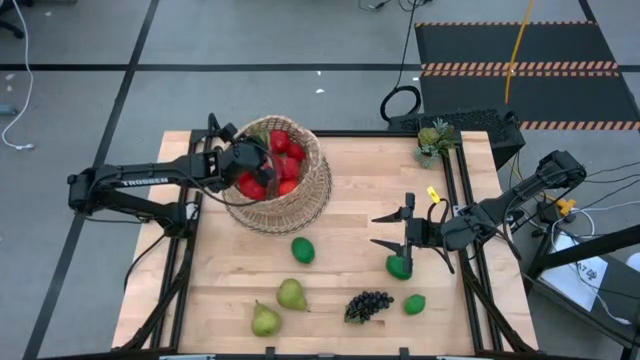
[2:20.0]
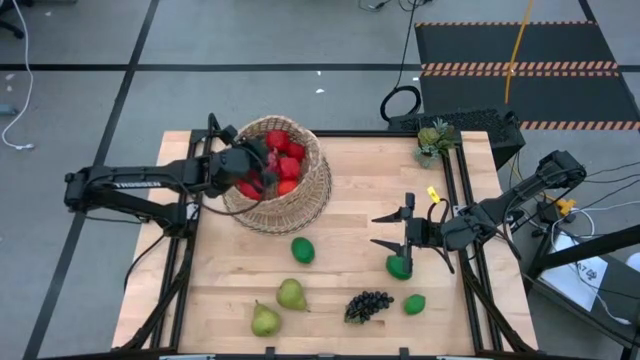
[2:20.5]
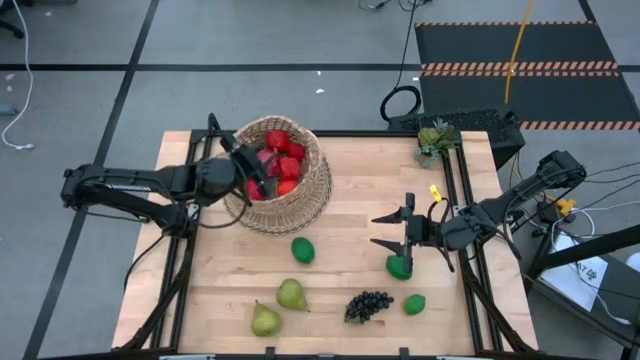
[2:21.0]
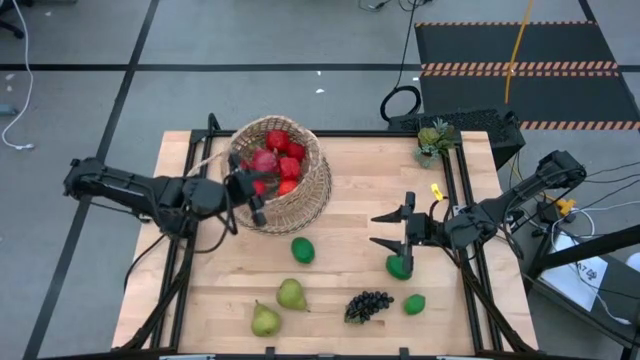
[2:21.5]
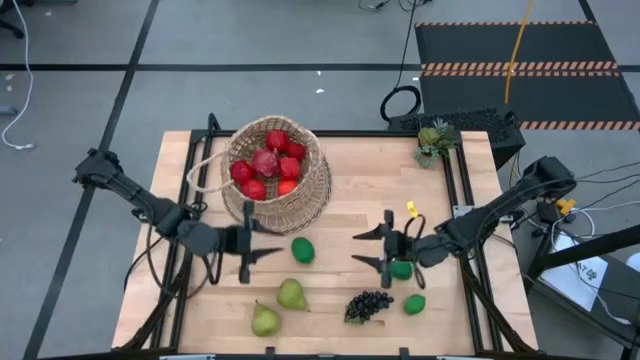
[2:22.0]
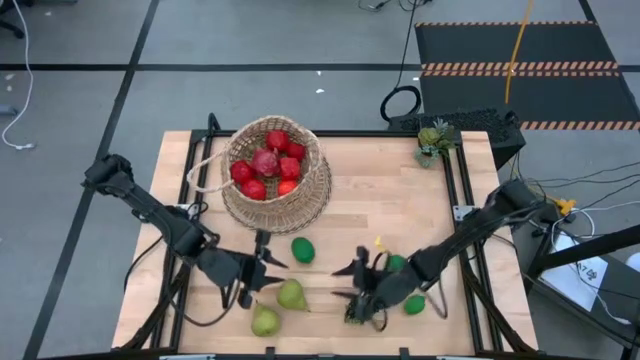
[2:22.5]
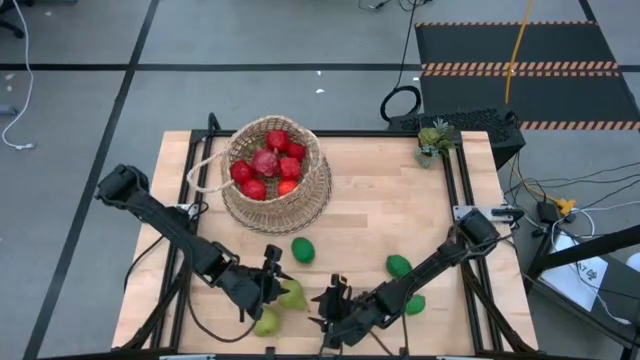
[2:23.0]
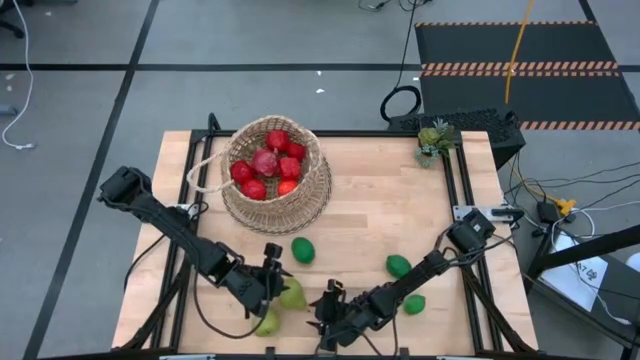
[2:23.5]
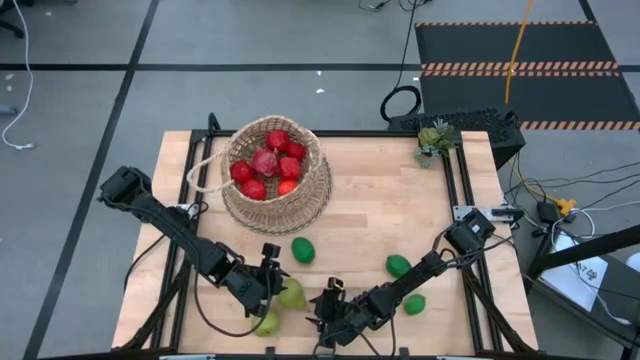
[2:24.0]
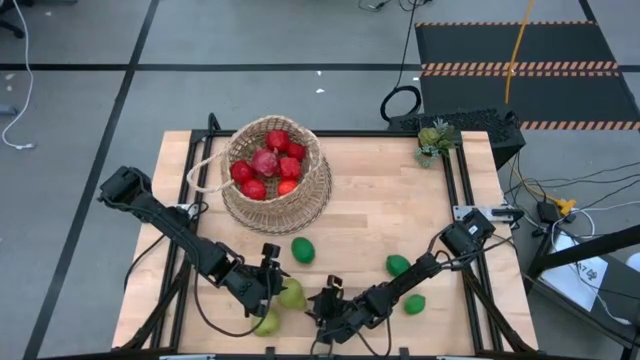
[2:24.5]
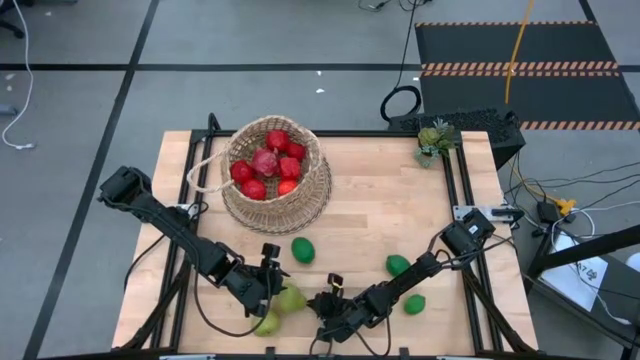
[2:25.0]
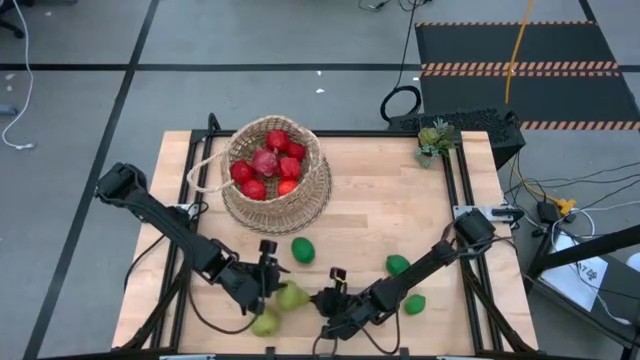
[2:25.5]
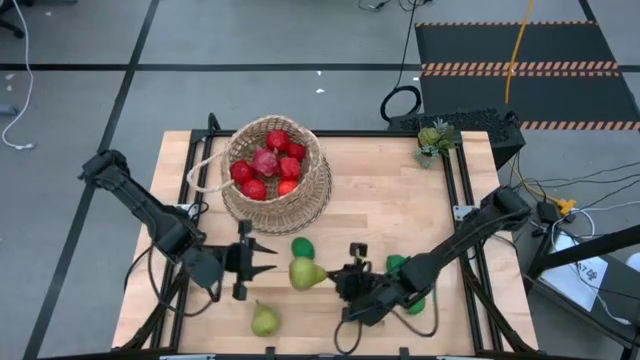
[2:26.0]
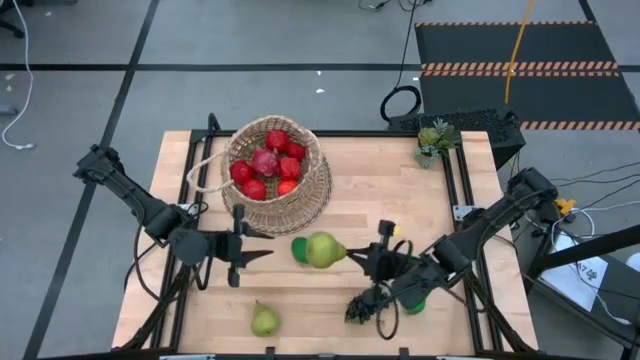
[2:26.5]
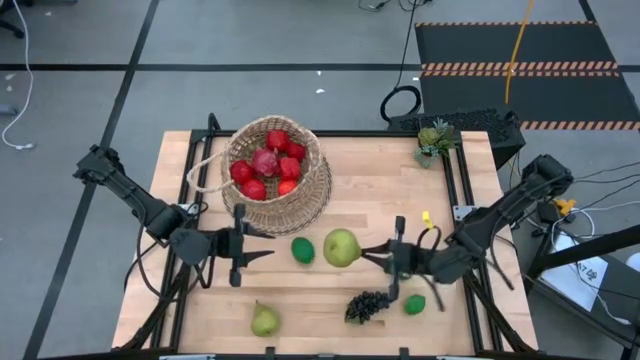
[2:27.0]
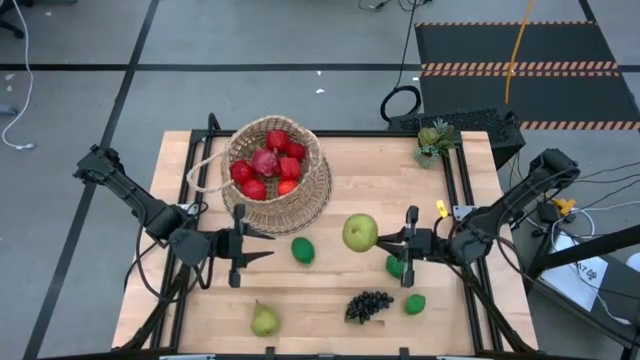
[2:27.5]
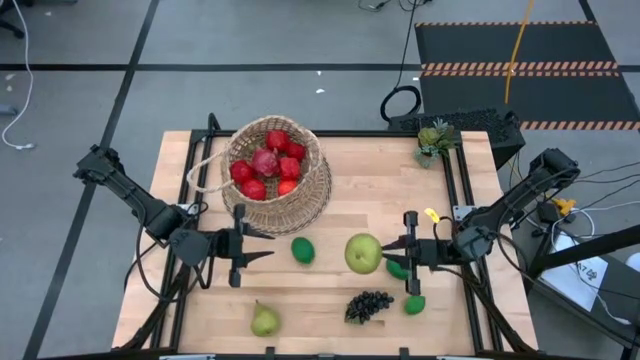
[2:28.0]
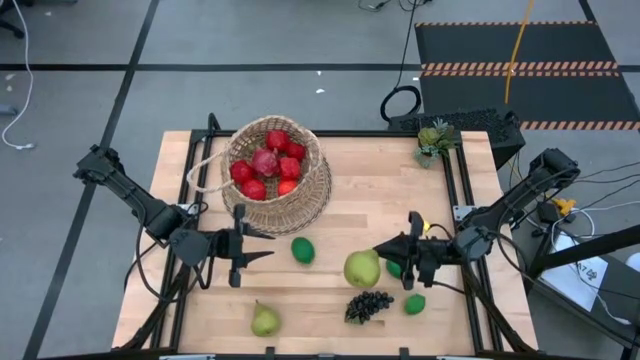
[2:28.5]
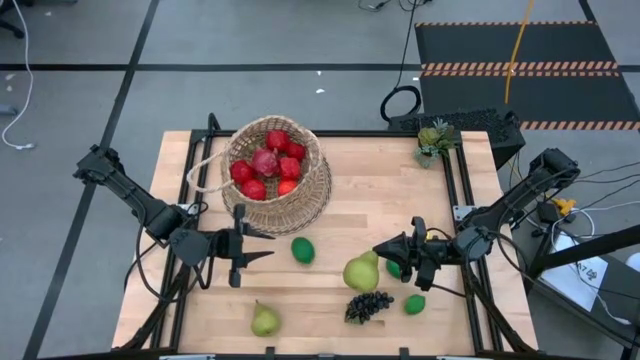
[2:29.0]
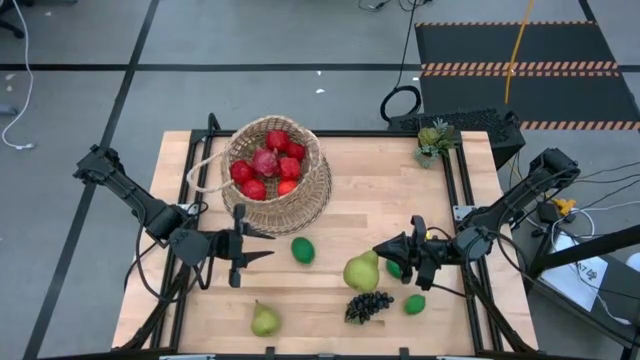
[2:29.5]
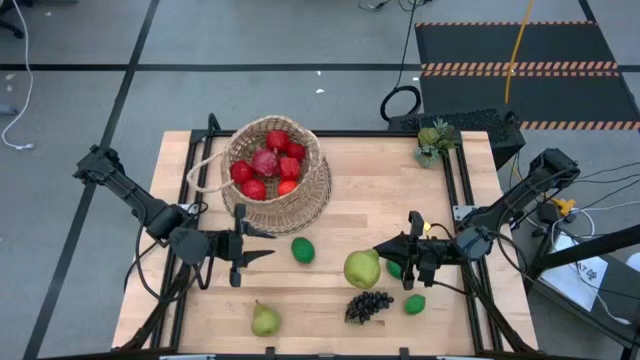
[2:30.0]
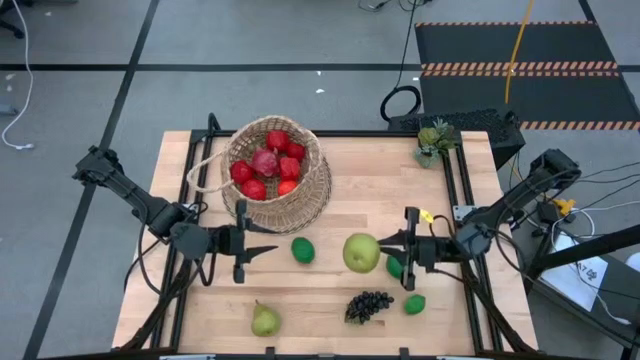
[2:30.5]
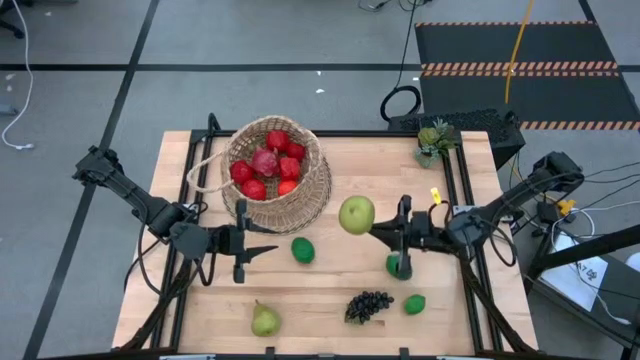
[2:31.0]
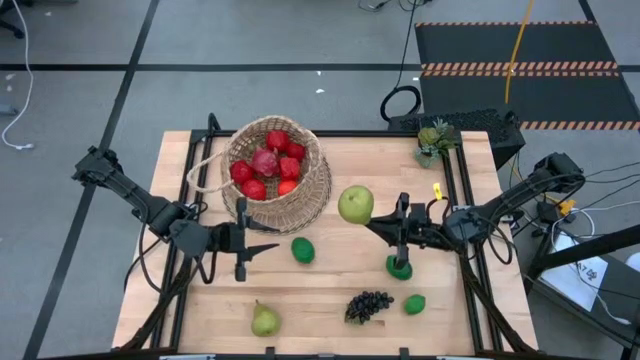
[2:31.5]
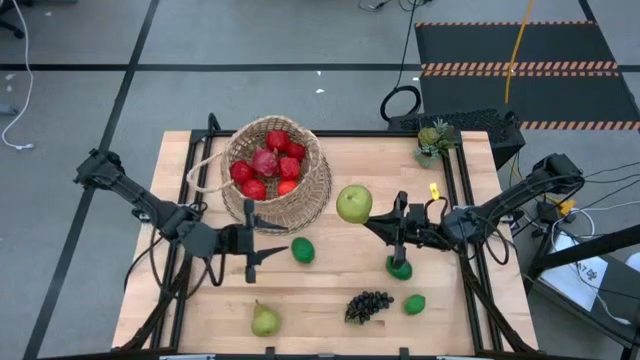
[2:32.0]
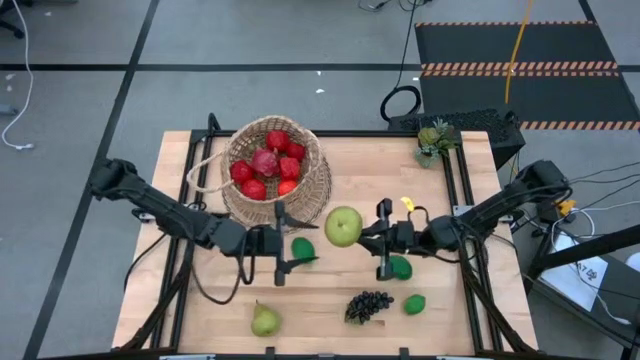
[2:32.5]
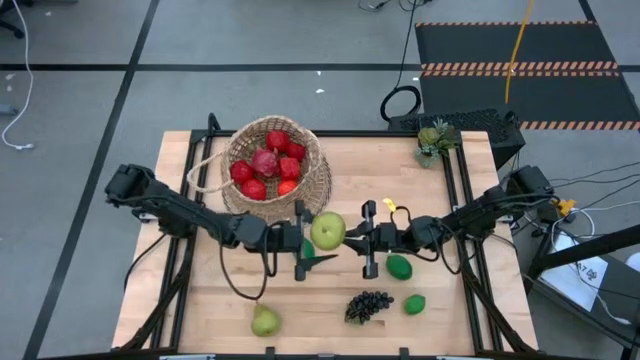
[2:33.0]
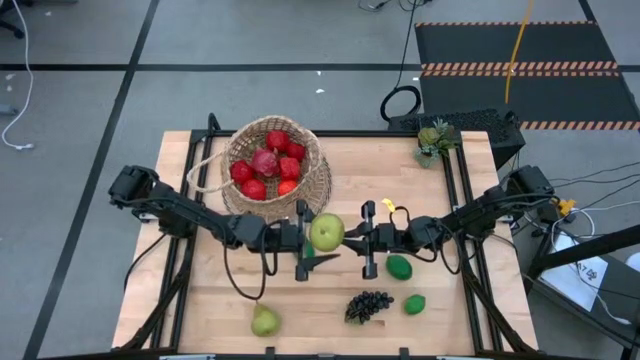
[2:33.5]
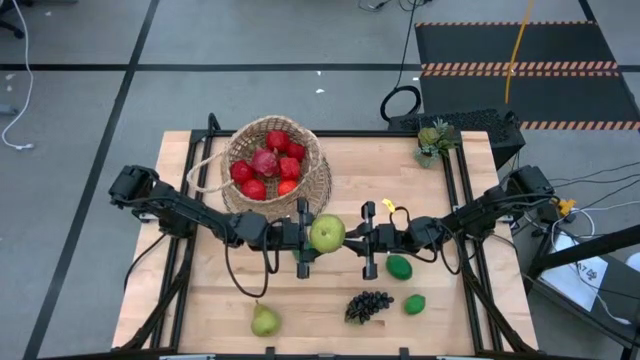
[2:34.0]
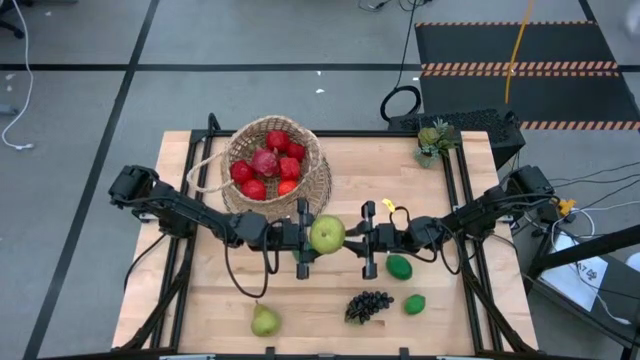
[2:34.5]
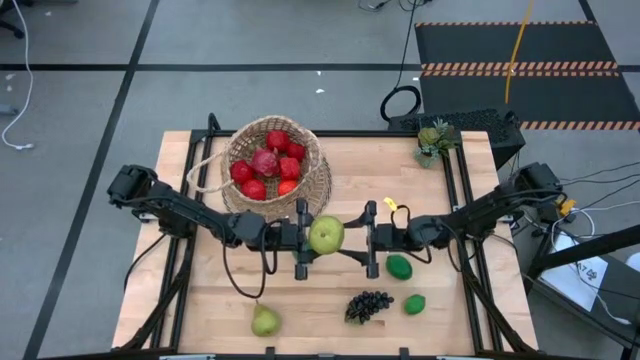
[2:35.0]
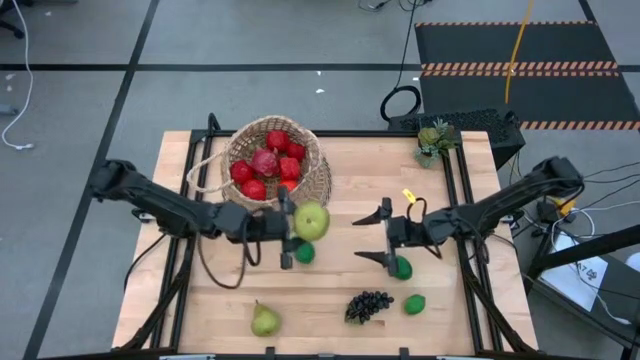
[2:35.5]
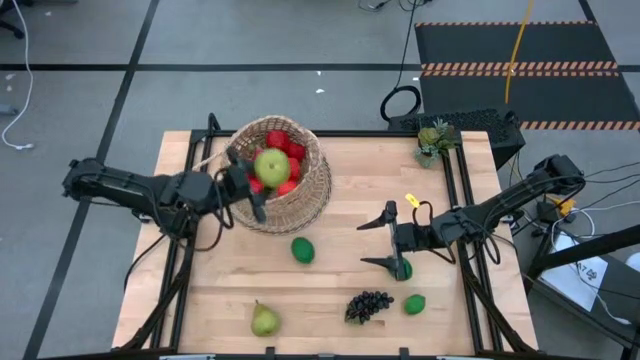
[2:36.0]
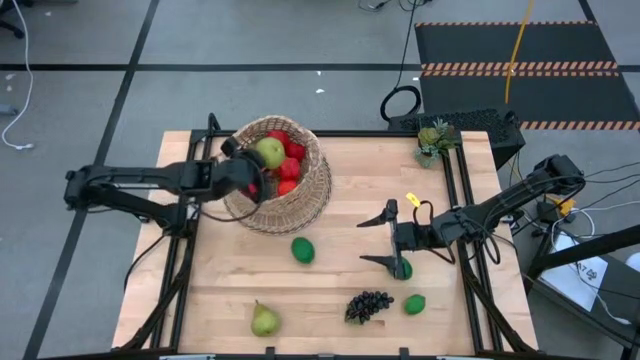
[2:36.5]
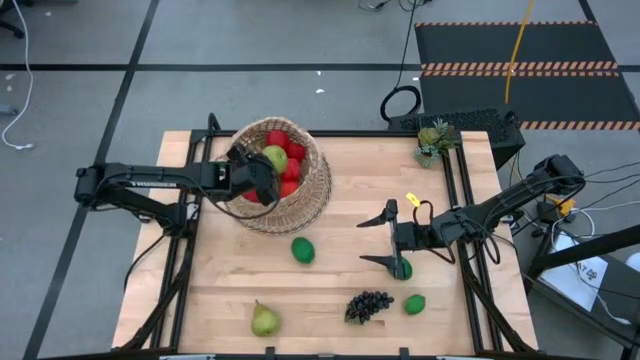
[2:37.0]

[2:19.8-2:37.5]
Task: Build produce basket
Put the top pear into the basket

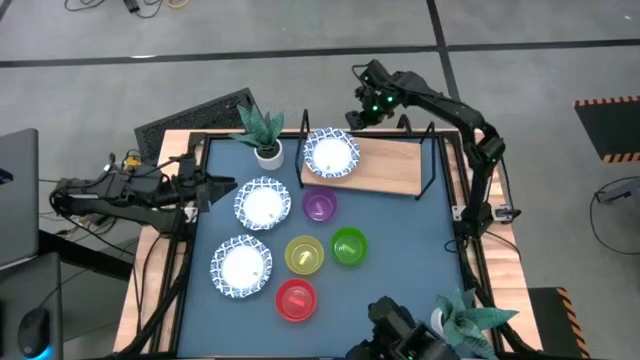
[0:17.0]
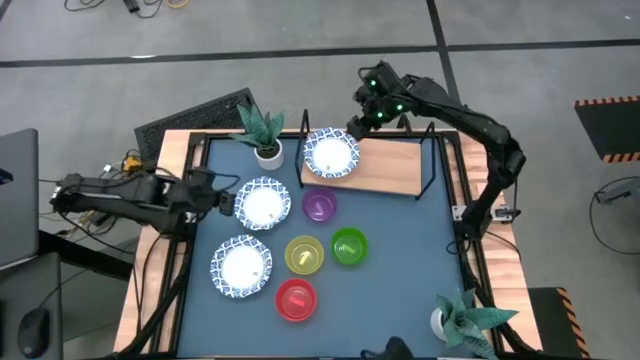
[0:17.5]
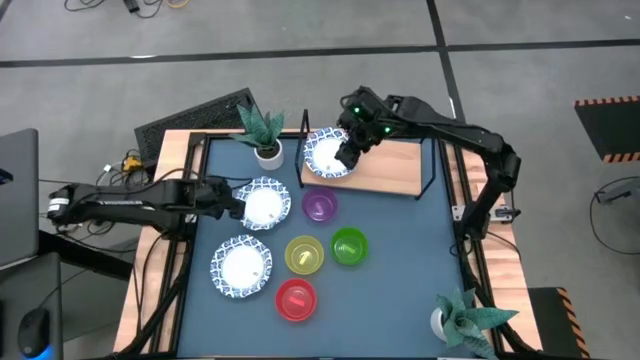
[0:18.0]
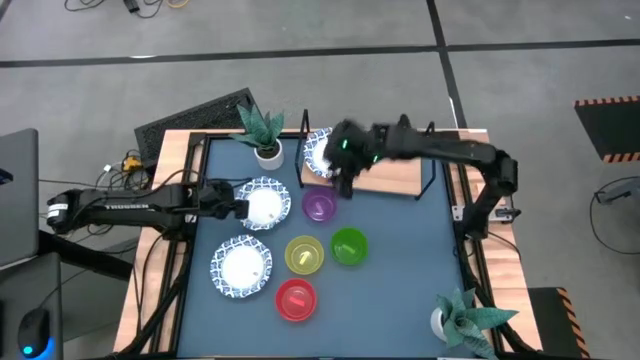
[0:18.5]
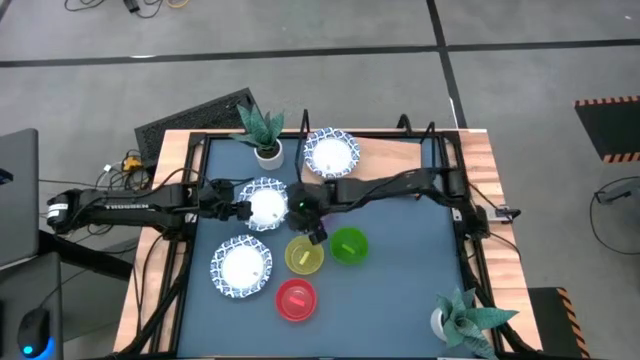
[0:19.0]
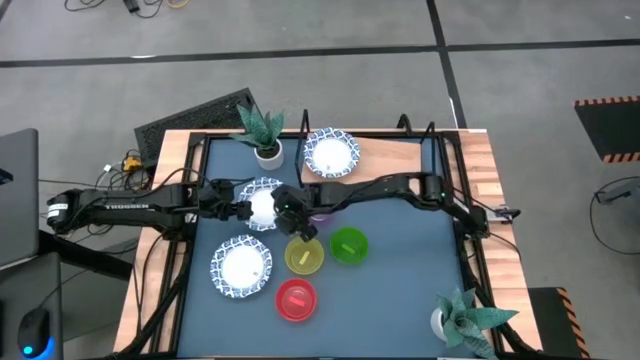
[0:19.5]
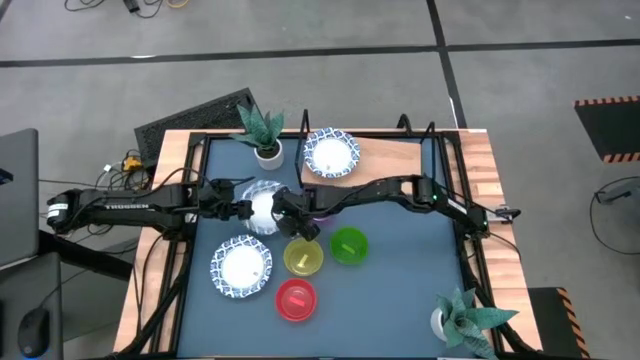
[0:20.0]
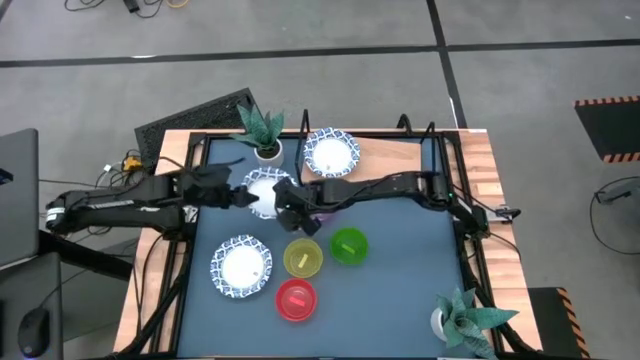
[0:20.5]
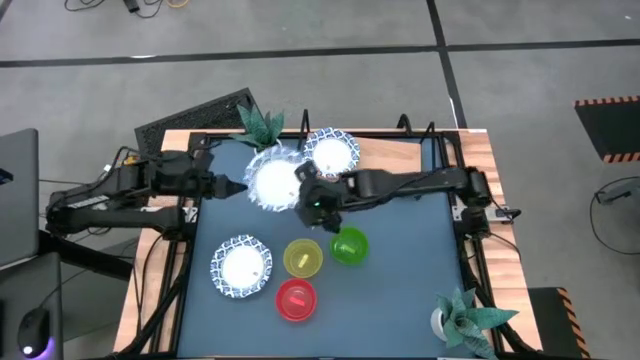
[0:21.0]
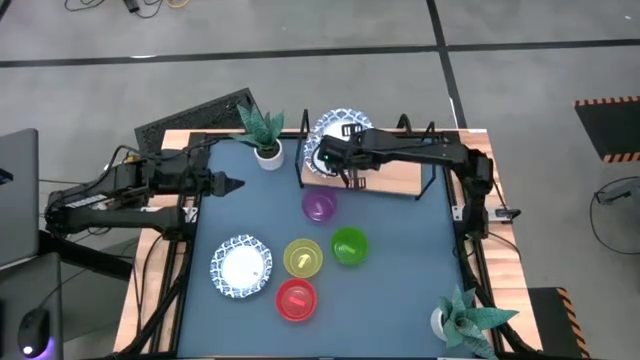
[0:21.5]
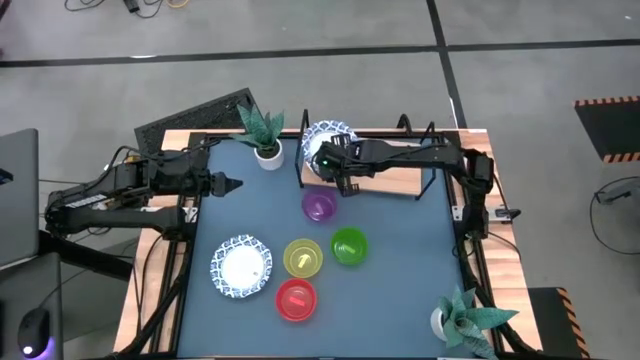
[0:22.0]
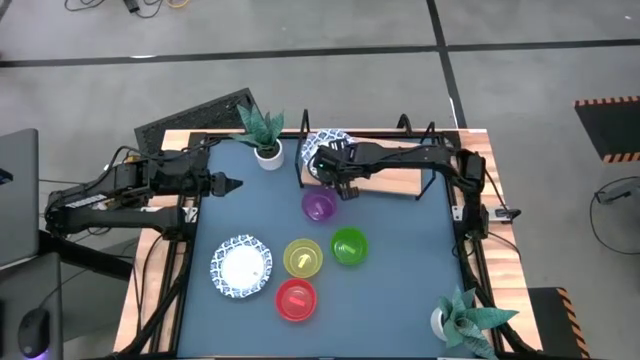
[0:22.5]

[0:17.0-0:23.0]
Task: Place and stack bowls onto a shelf
Stack the white bowl on top of the white bowl on the shelf
